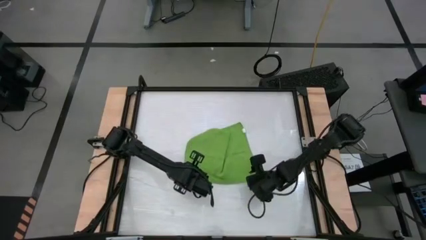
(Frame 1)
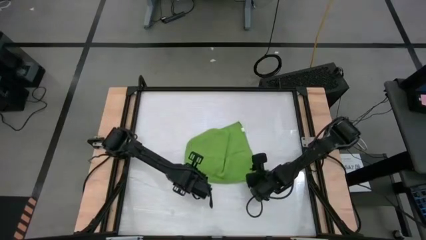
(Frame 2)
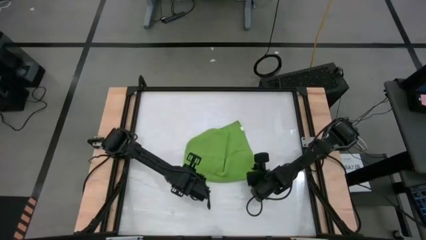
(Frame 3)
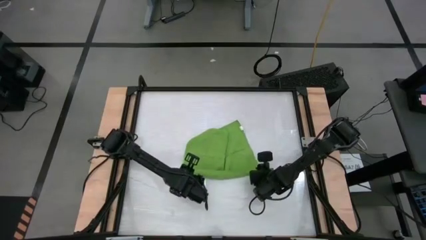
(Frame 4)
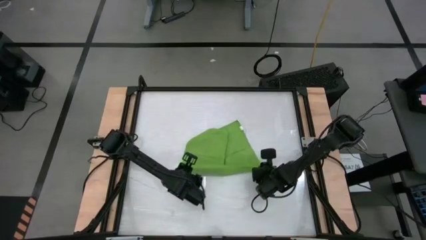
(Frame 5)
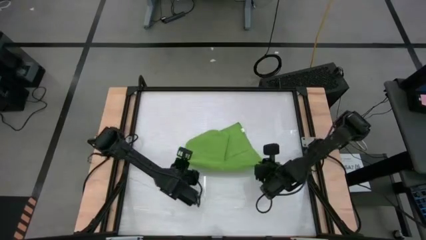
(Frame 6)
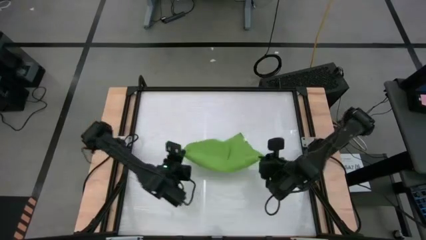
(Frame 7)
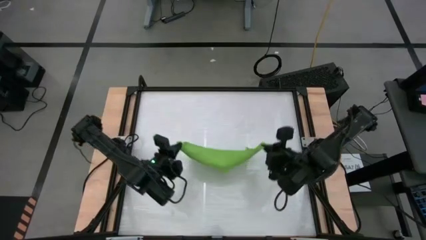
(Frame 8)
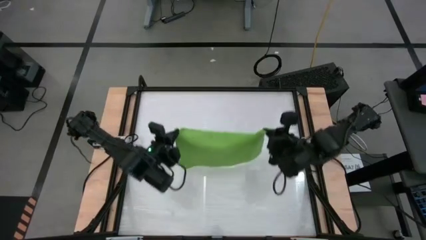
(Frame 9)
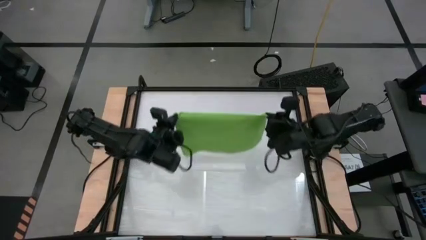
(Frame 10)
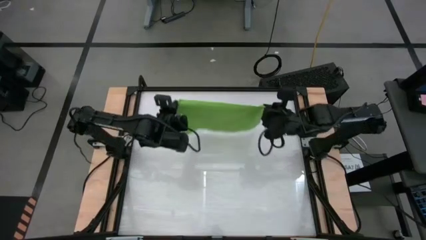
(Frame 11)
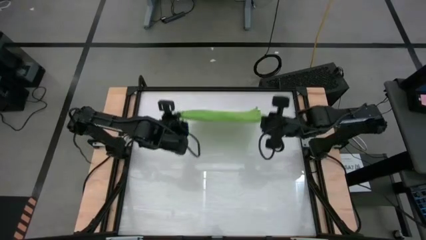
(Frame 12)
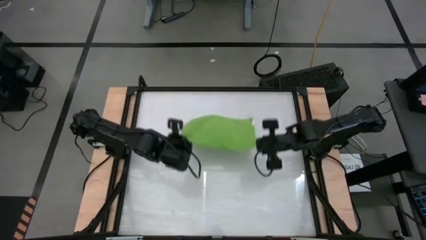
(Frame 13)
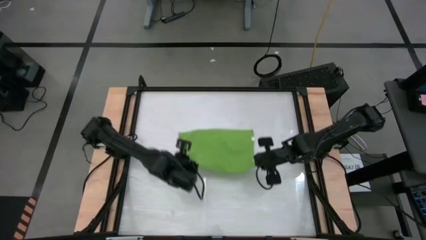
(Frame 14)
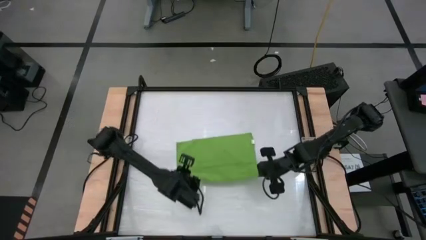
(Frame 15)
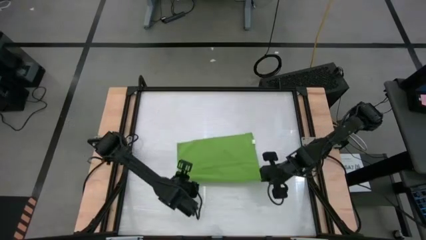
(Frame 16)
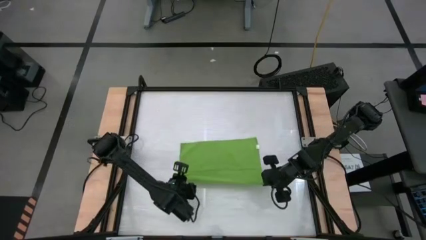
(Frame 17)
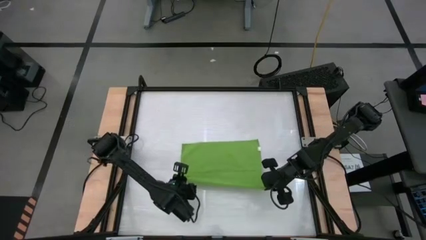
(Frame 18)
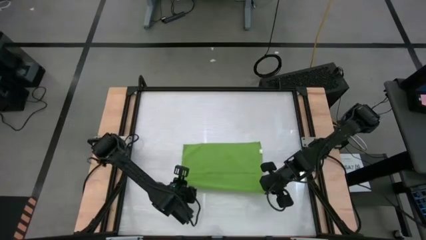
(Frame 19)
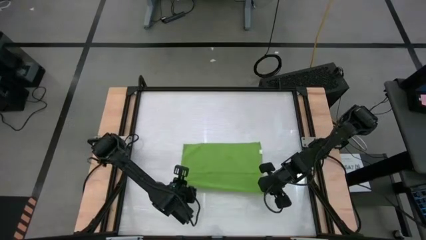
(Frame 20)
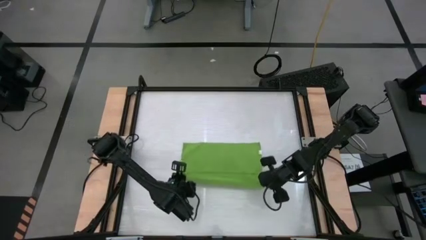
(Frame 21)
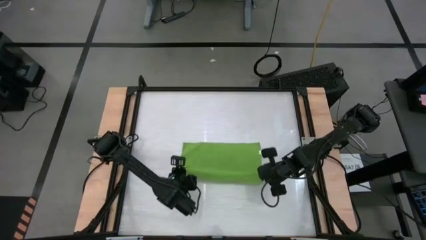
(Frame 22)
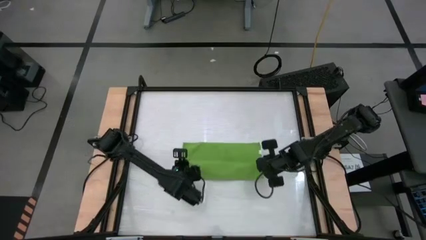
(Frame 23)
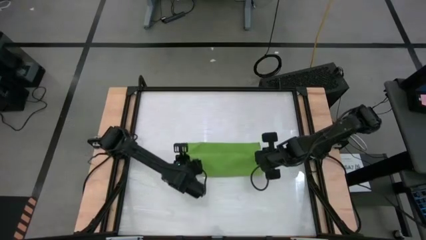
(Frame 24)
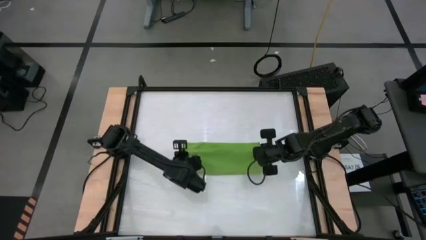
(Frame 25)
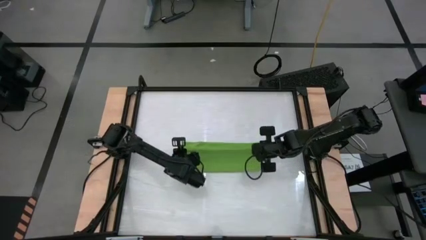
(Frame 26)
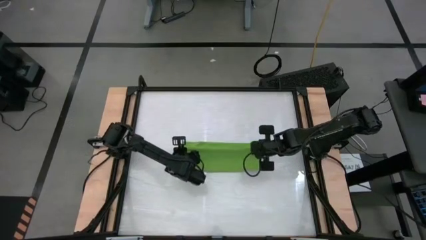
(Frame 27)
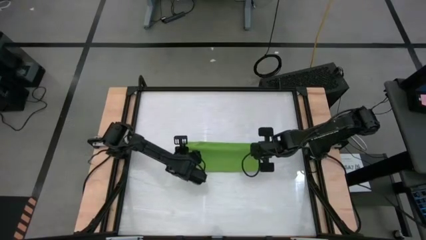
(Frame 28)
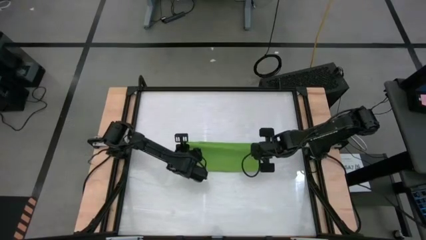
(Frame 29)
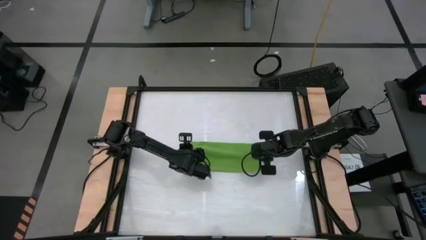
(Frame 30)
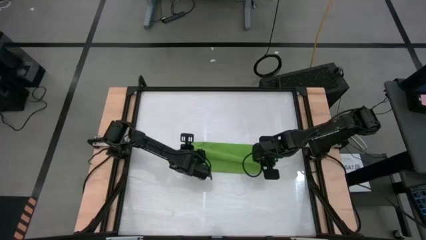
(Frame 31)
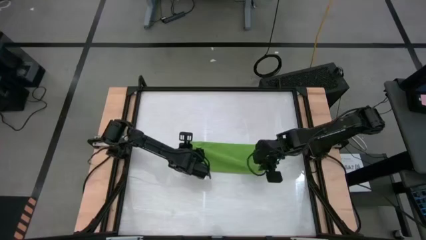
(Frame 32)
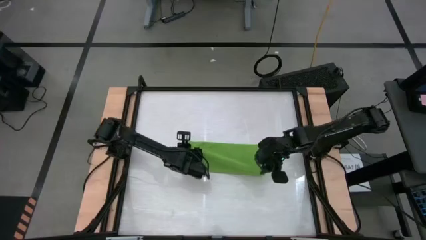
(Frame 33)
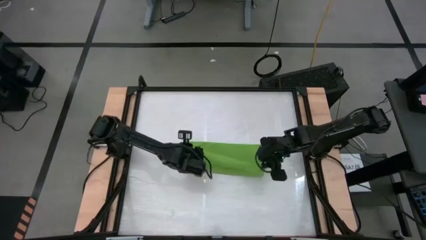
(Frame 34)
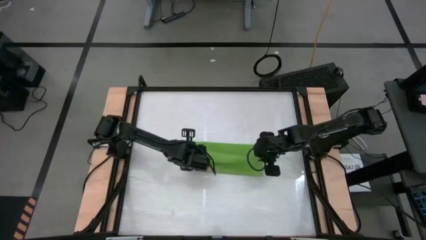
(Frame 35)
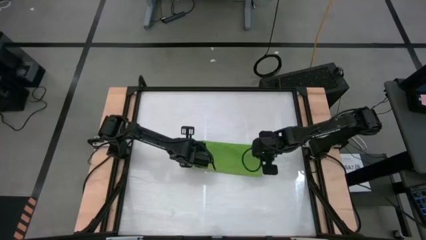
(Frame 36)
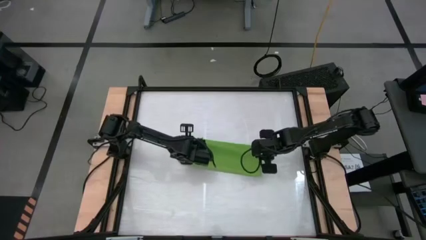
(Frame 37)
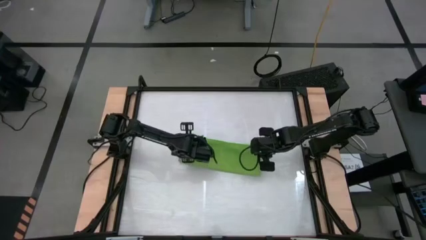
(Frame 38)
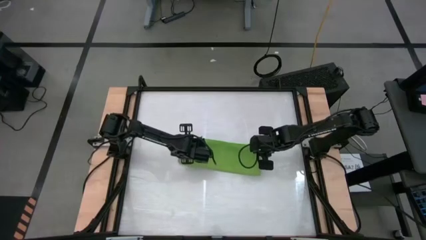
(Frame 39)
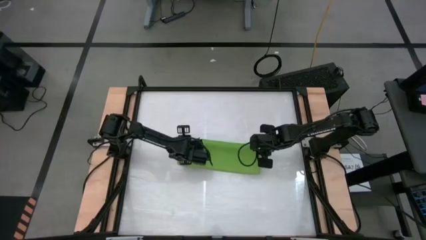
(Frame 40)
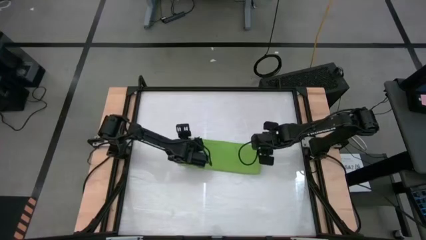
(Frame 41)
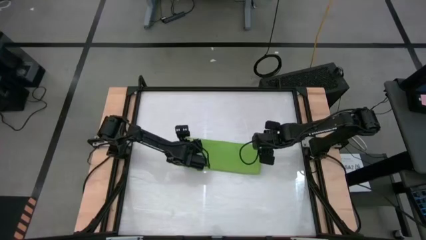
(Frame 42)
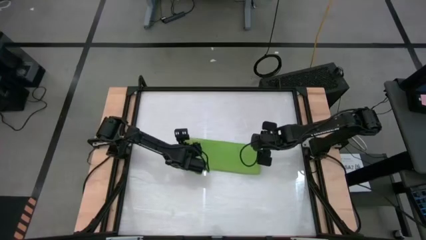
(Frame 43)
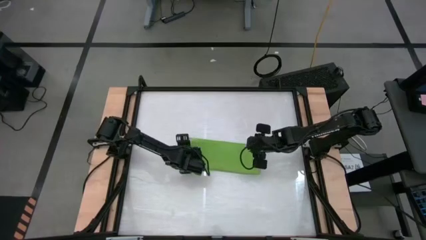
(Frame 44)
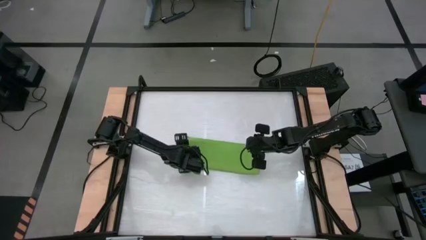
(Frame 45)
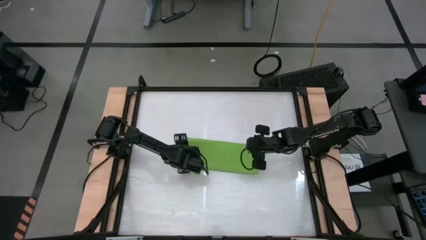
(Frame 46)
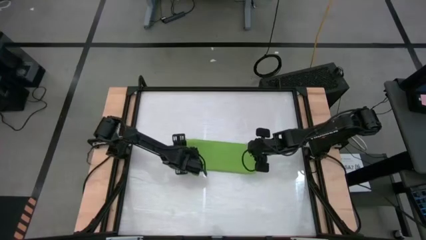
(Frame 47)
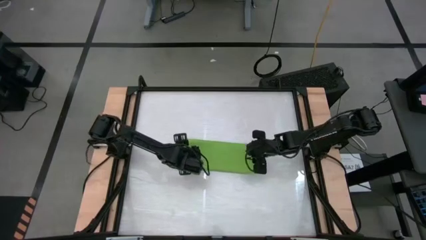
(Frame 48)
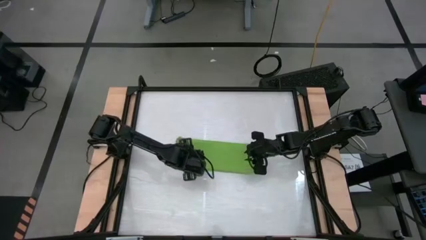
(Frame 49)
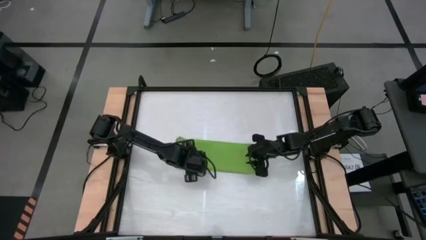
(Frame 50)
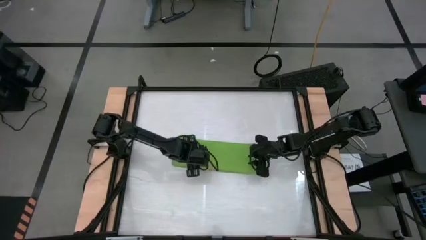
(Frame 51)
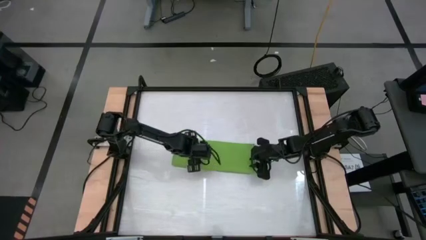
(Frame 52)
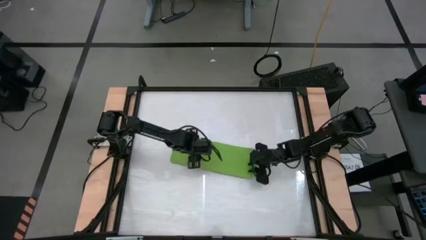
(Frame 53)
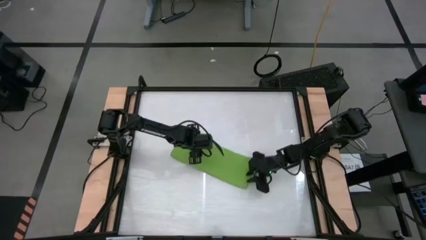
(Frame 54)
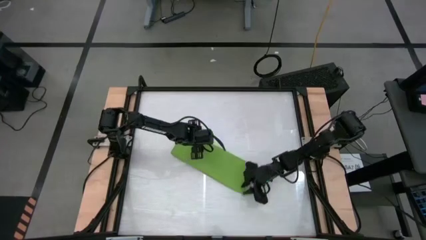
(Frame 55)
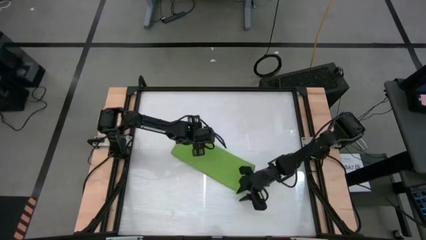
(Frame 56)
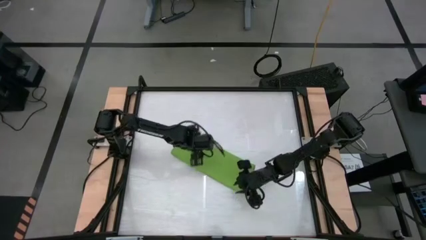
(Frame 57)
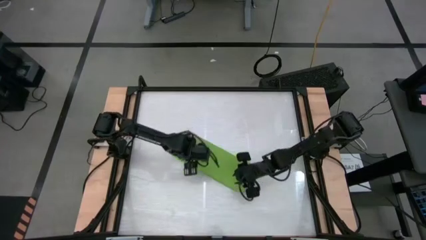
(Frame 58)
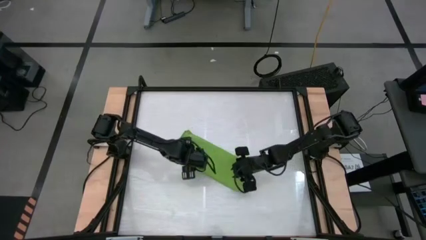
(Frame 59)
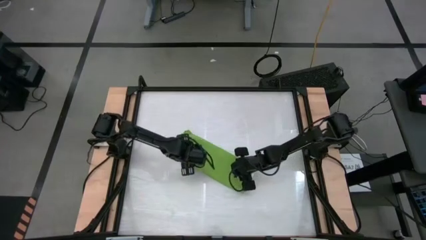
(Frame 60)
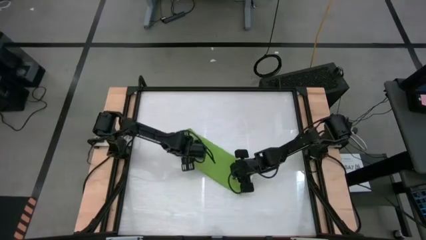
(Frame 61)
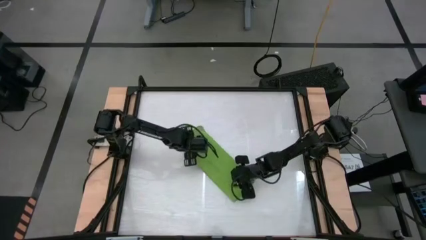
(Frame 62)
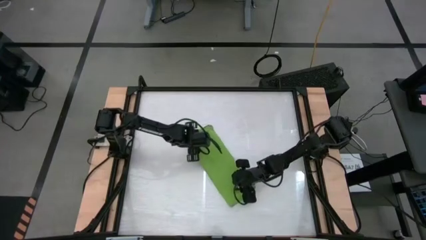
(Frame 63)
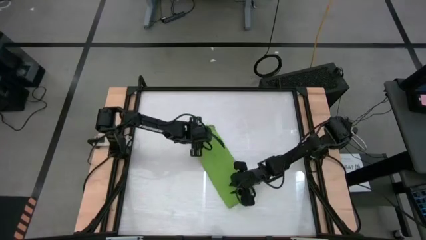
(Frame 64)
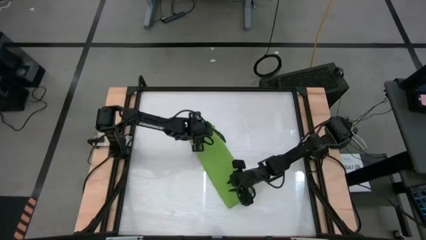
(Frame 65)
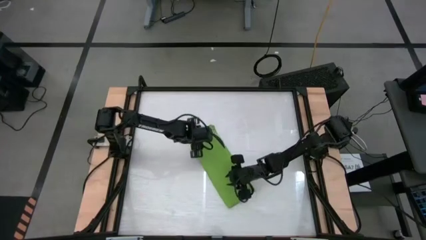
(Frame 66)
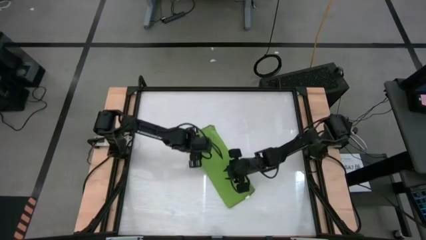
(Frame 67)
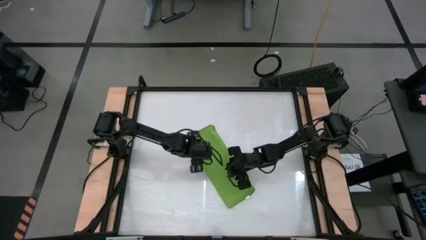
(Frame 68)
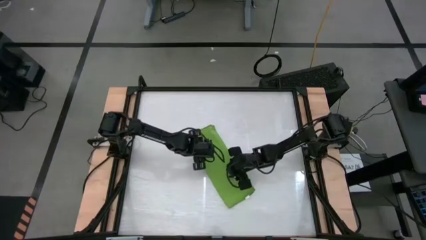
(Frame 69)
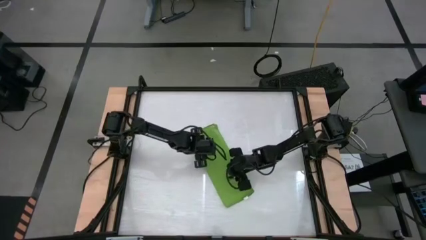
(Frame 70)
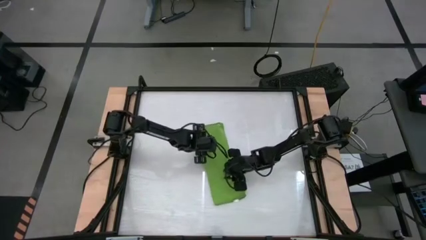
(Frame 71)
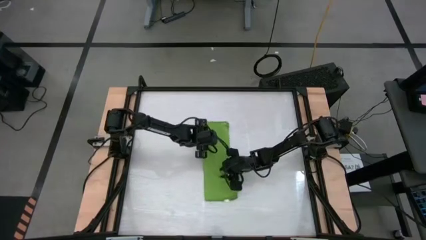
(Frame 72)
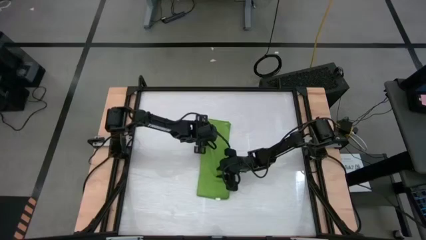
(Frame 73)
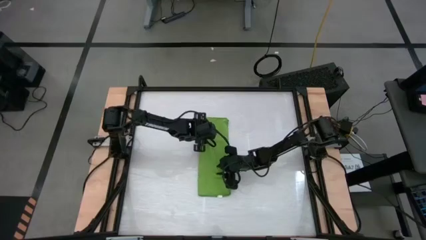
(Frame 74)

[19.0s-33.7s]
Task: Roll towel into tight, uniform cylinder
Fold the green microfiber towel
